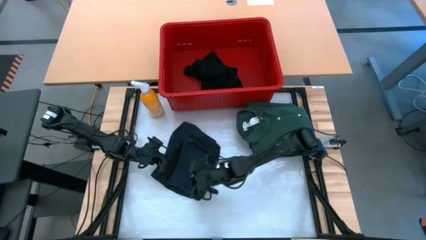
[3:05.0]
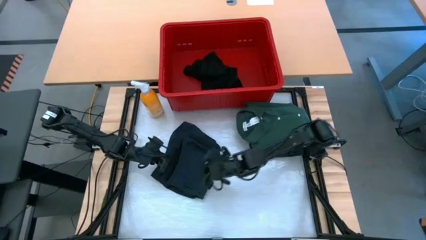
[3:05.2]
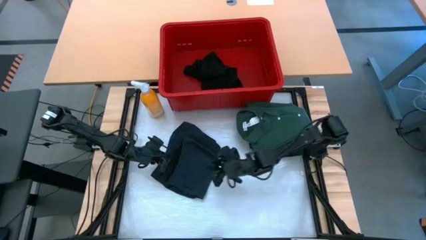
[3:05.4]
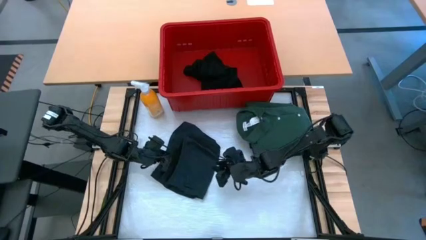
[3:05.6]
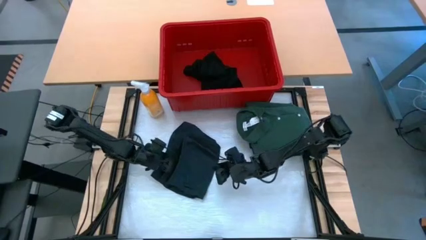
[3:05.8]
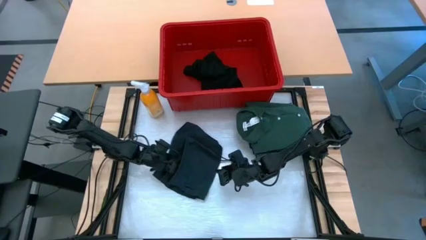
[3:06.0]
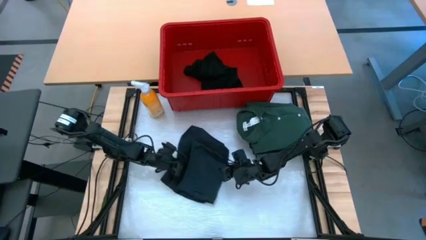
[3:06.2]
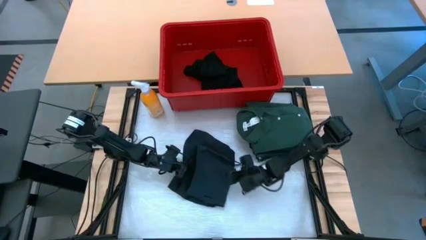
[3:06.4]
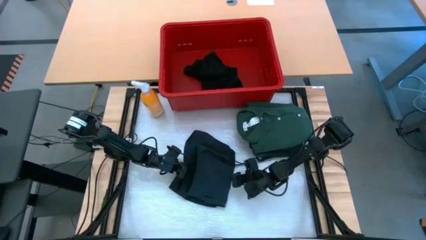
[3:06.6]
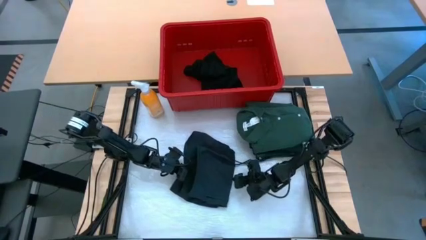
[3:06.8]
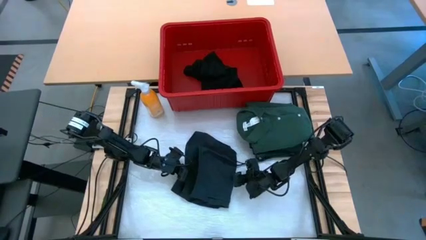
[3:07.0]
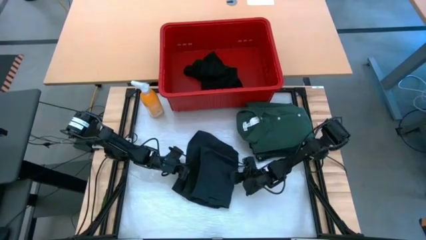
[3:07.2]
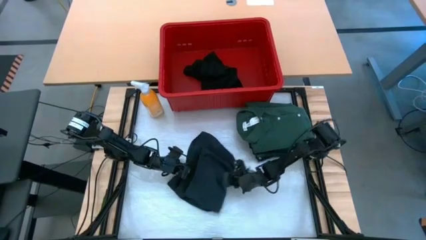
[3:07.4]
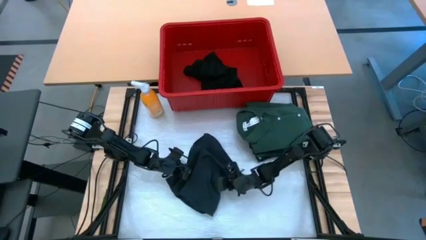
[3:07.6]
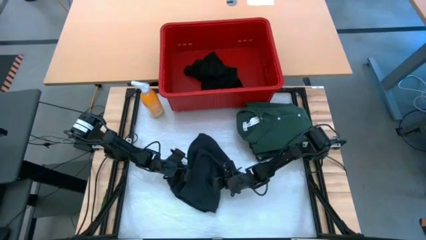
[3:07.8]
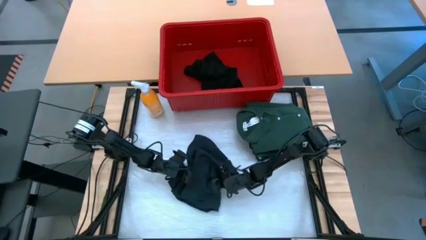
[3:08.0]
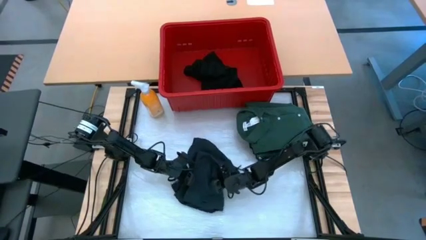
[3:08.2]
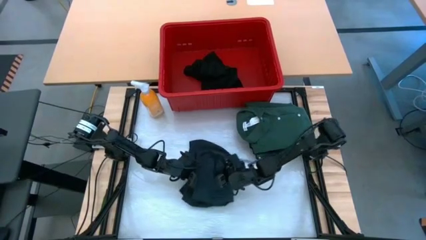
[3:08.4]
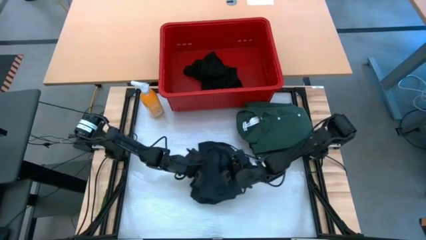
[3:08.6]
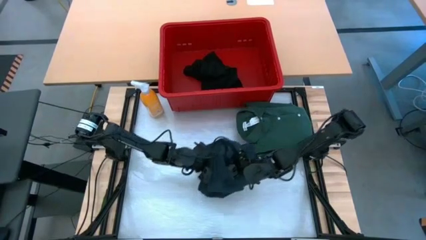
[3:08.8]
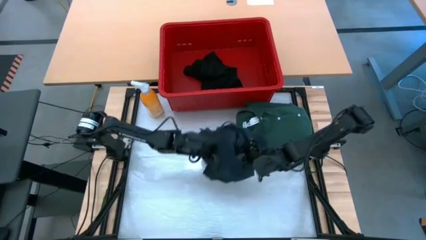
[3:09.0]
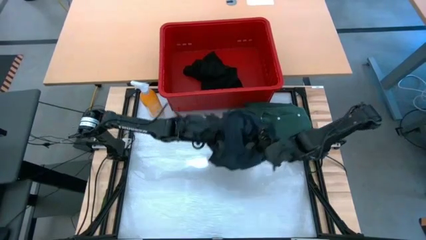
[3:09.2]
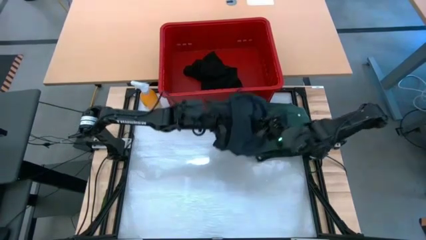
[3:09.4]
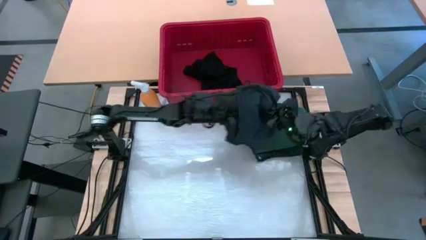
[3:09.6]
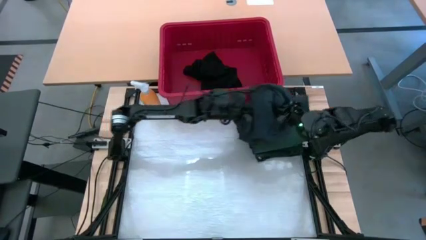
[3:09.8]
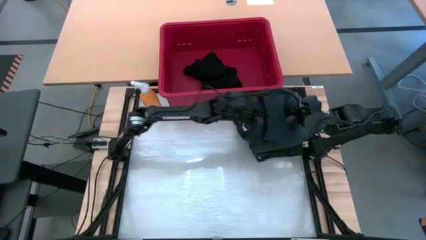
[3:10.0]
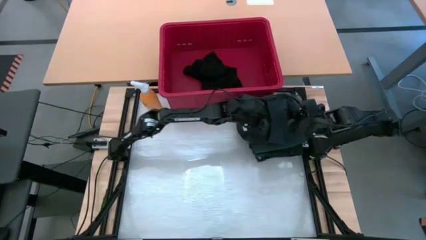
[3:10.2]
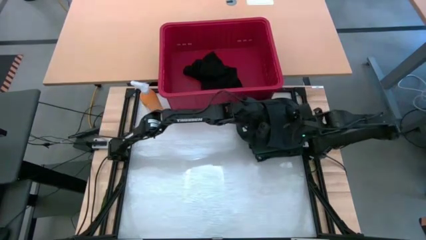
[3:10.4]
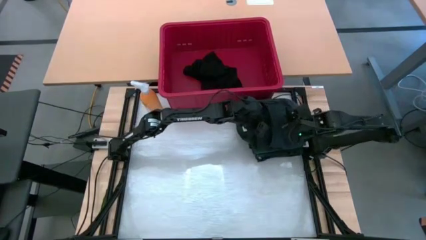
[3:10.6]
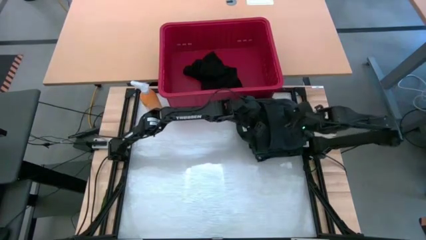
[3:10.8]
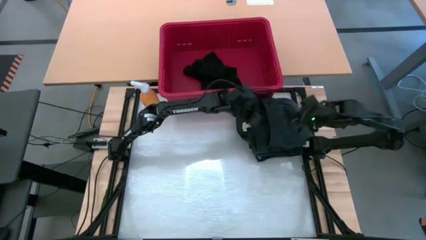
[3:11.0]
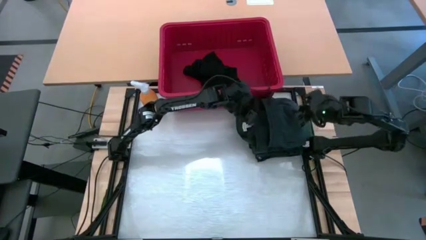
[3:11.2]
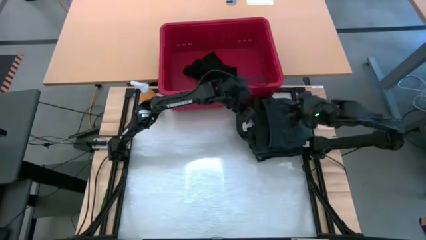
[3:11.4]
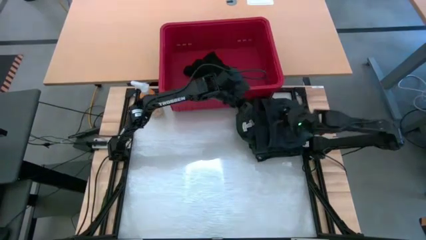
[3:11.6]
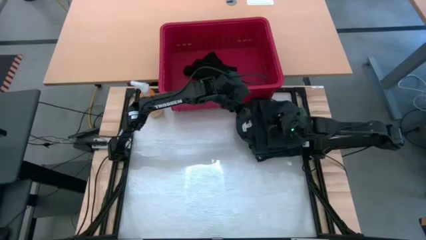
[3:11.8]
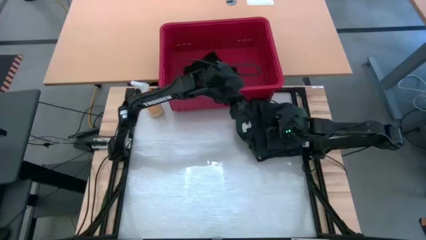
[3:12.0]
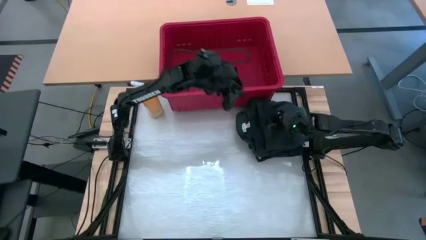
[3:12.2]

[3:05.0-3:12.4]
Task: Fold Laundry from Bin
Stack the dark blue shorts on top of the green shirt

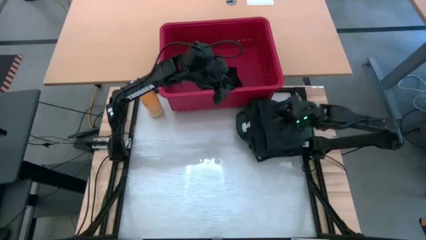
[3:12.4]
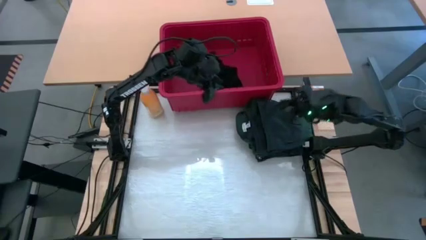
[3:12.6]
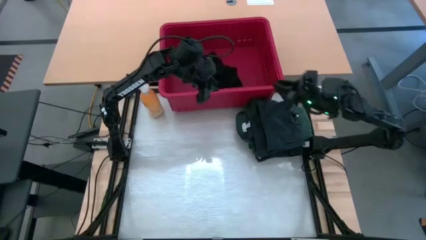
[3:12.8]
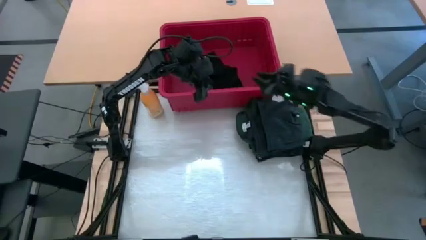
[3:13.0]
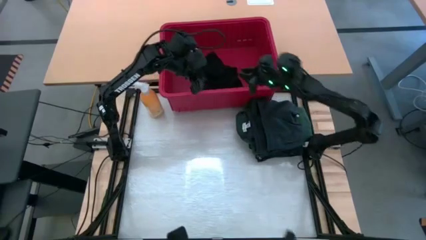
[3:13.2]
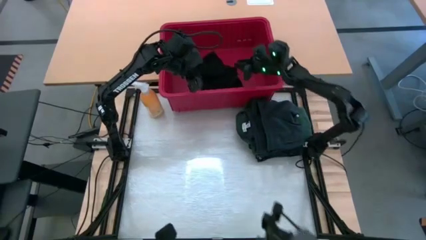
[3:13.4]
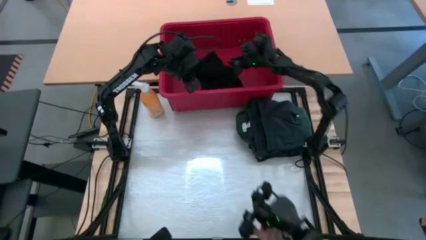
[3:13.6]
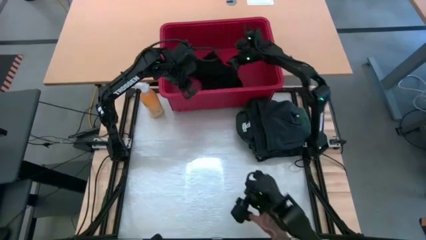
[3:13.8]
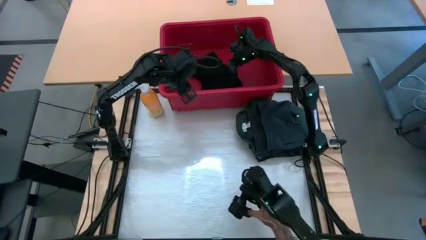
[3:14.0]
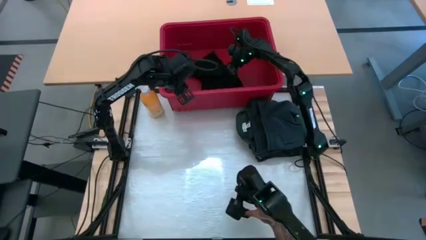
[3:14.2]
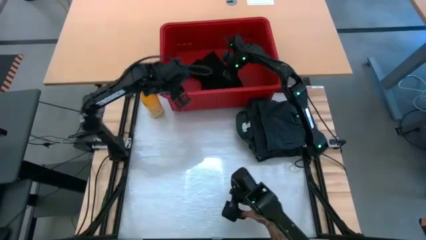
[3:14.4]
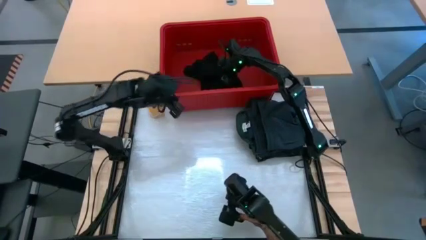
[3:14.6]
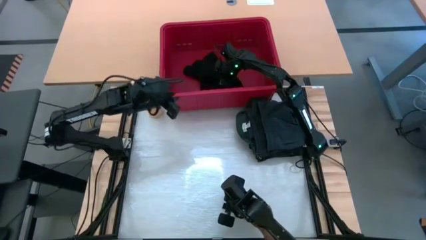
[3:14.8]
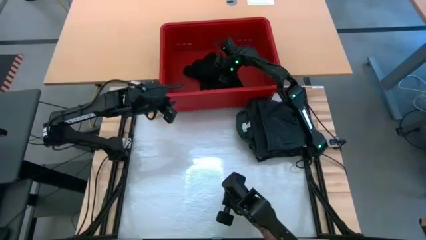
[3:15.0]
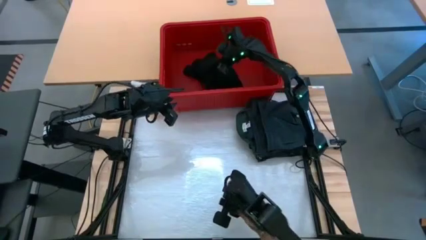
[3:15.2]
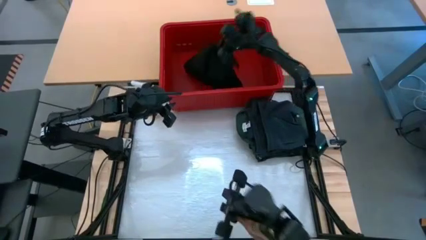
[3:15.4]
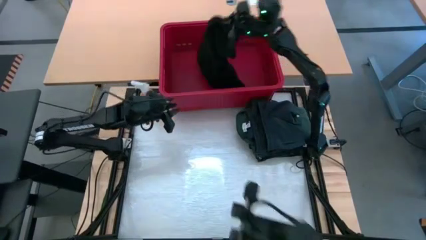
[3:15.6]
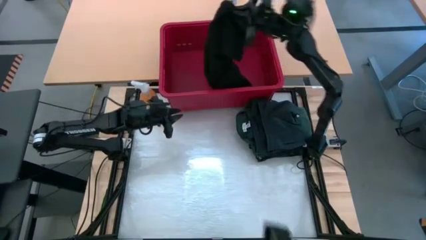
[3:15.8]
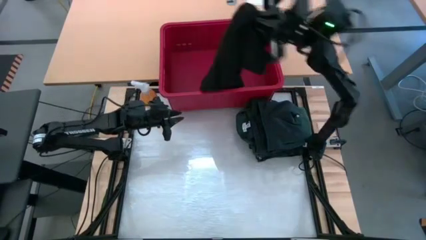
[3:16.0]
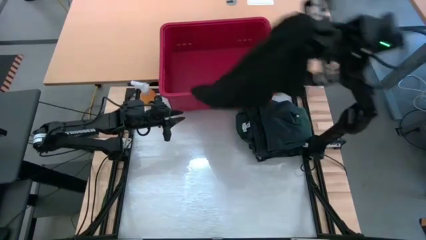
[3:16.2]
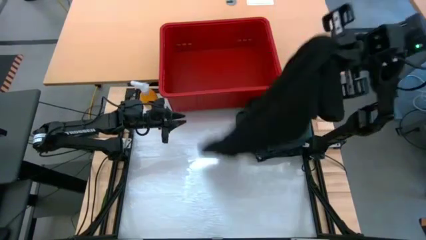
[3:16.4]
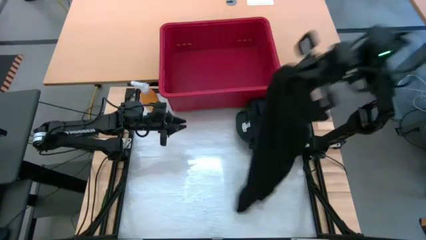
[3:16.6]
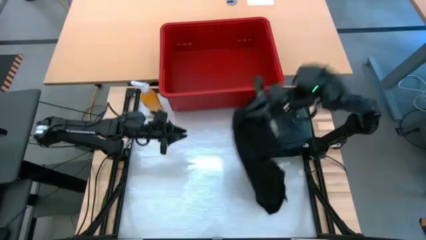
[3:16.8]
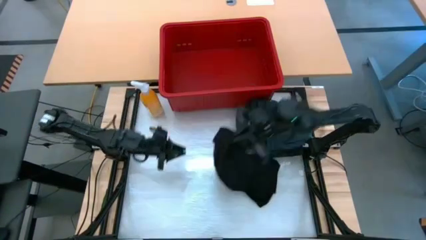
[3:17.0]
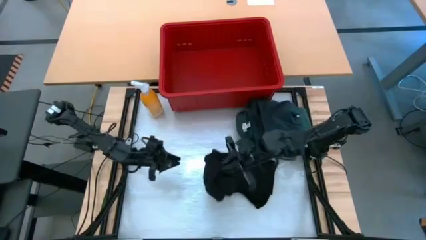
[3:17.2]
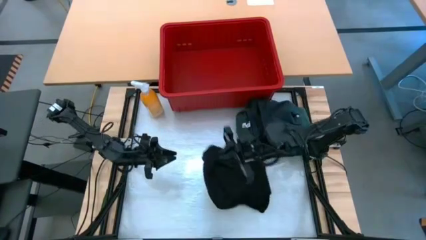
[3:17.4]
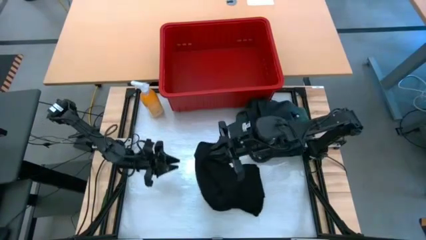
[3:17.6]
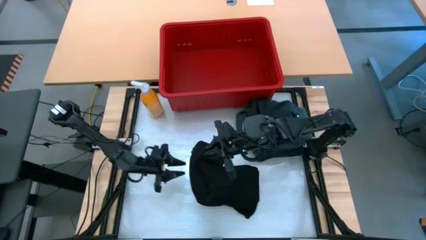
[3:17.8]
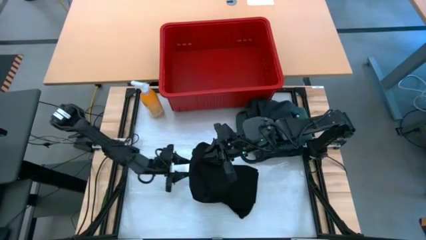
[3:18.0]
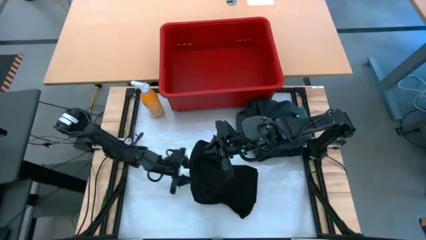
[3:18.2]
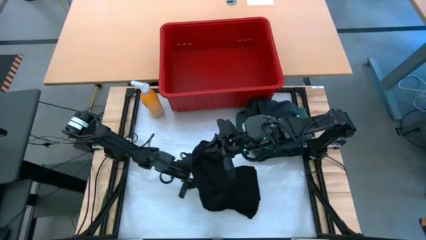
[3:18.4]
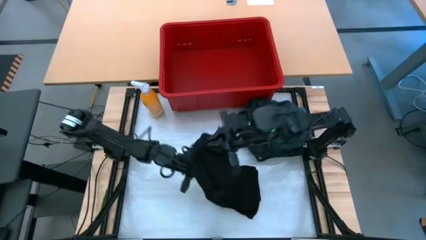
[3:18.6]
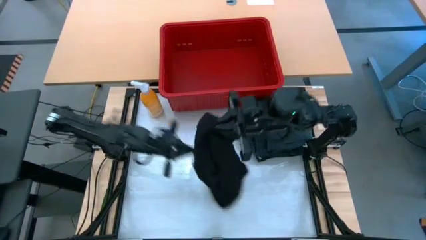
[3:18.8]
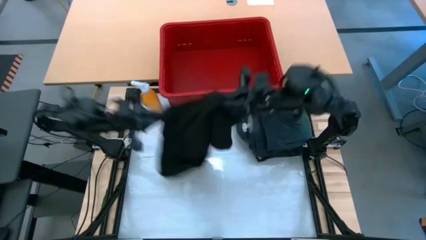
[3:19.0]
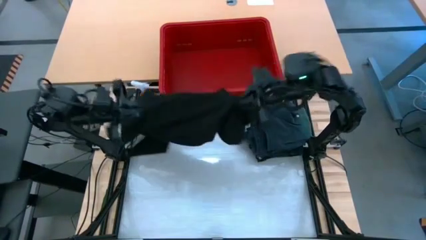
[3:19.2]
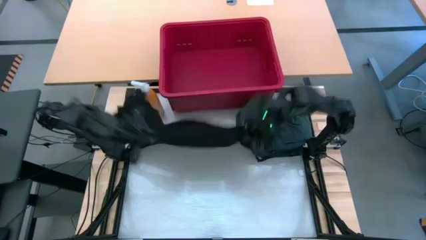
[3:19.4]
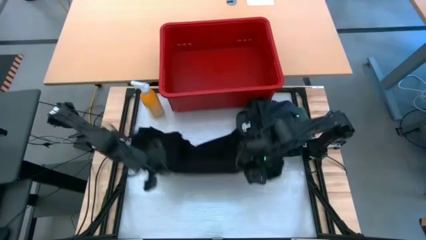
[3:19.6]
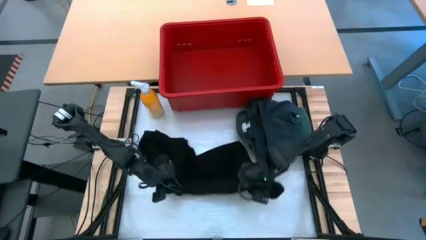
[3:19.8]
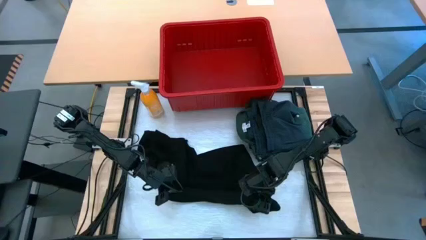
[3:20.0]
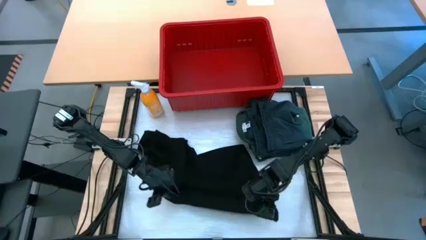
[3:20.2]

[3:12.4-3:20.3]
Remove the black shirt from the red bin
